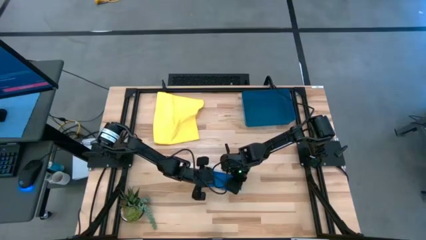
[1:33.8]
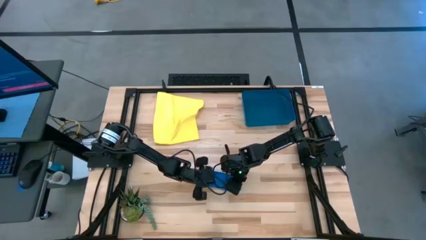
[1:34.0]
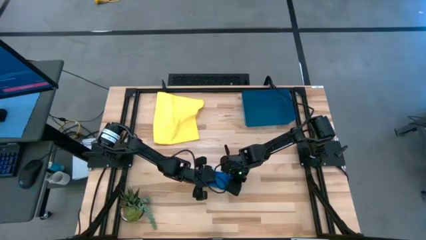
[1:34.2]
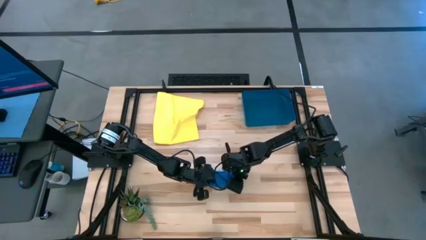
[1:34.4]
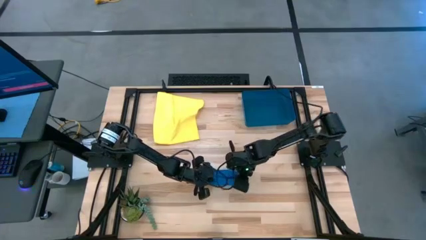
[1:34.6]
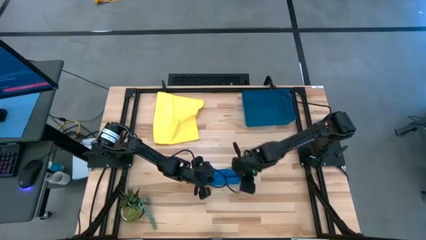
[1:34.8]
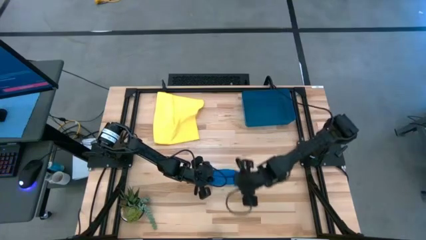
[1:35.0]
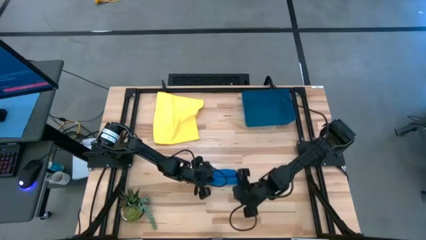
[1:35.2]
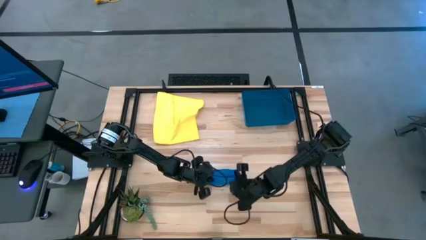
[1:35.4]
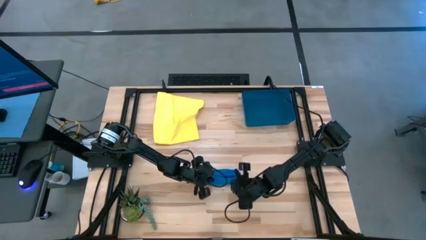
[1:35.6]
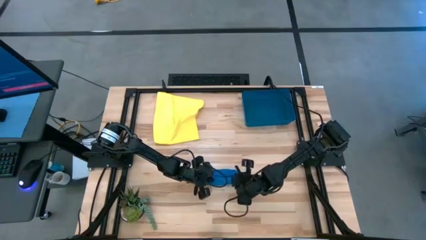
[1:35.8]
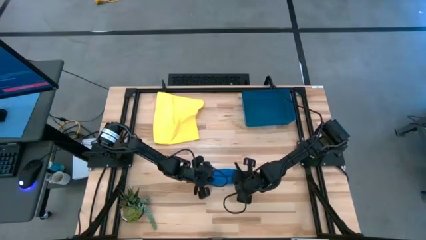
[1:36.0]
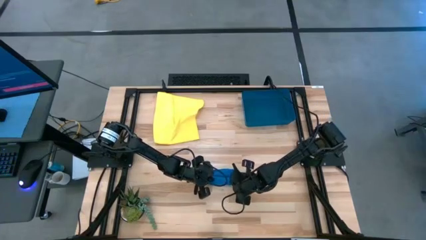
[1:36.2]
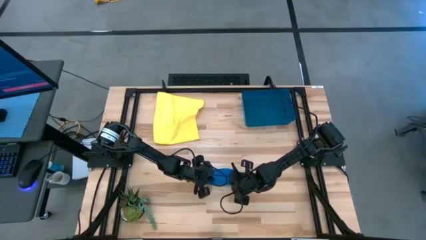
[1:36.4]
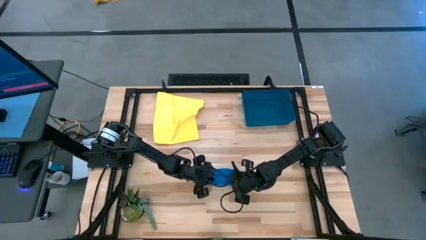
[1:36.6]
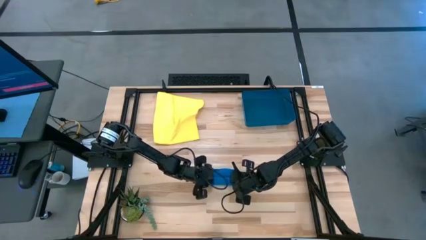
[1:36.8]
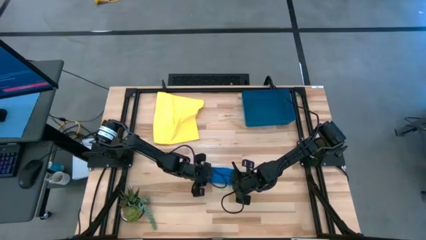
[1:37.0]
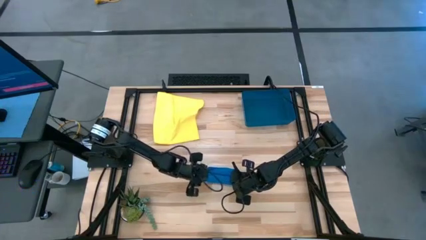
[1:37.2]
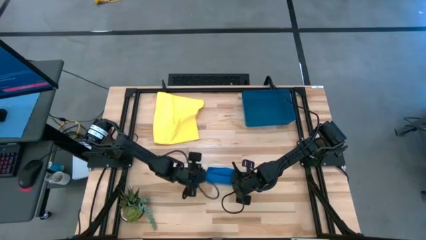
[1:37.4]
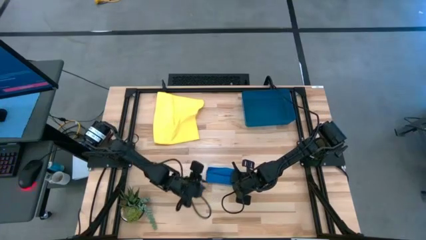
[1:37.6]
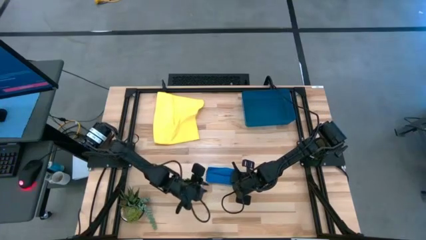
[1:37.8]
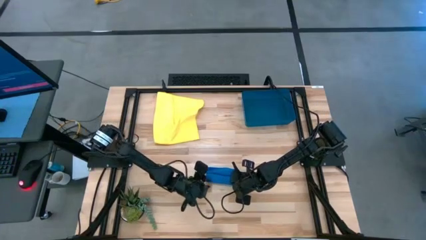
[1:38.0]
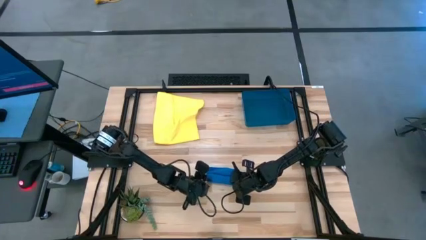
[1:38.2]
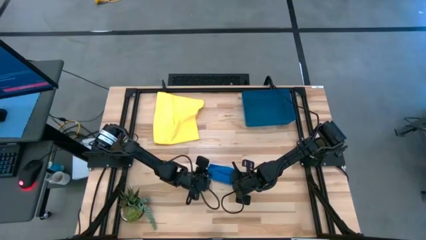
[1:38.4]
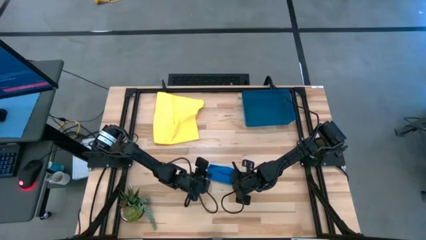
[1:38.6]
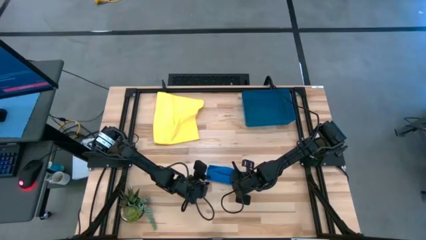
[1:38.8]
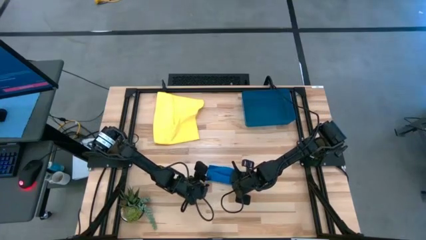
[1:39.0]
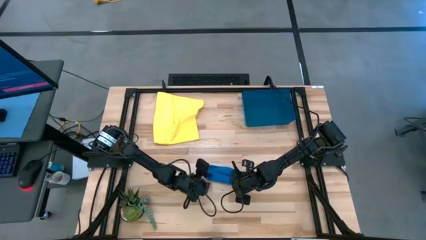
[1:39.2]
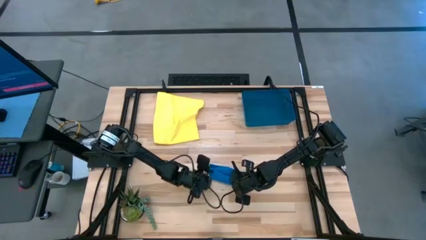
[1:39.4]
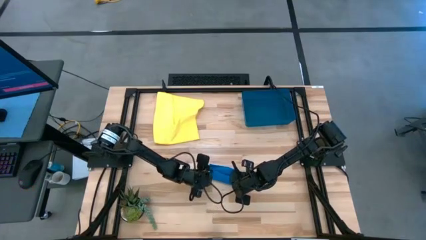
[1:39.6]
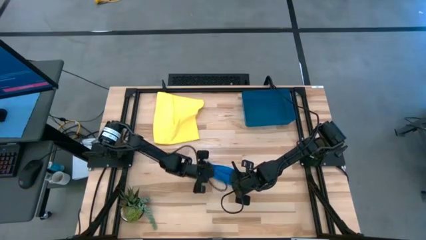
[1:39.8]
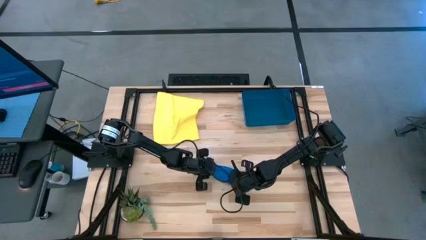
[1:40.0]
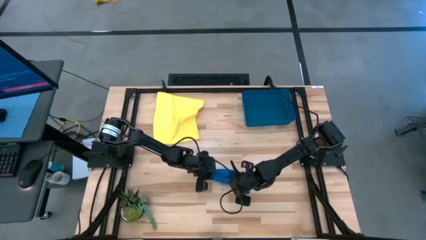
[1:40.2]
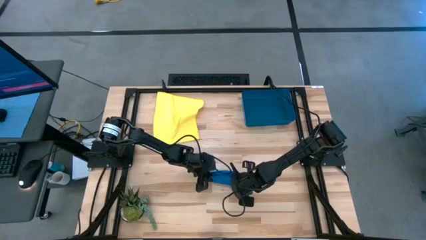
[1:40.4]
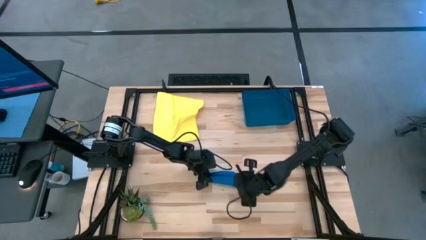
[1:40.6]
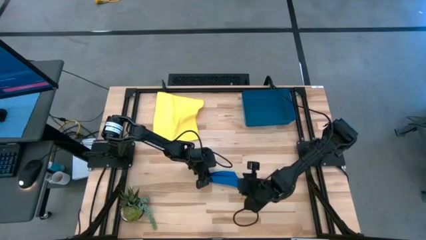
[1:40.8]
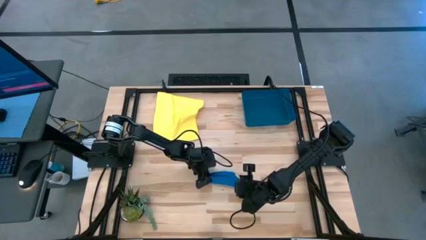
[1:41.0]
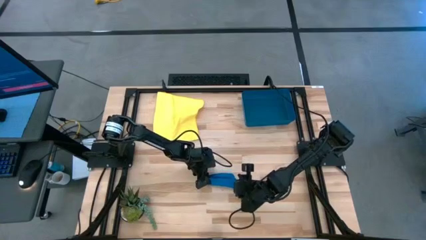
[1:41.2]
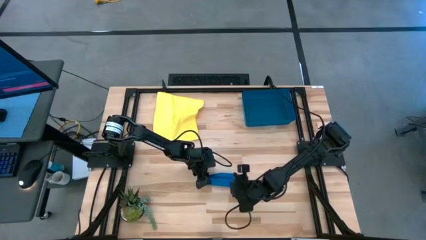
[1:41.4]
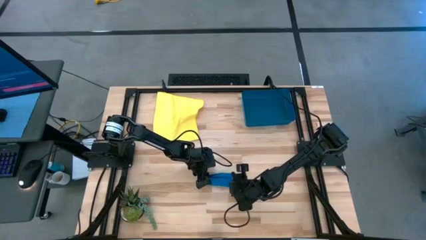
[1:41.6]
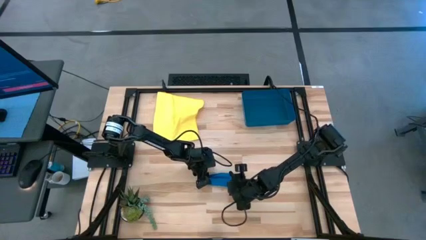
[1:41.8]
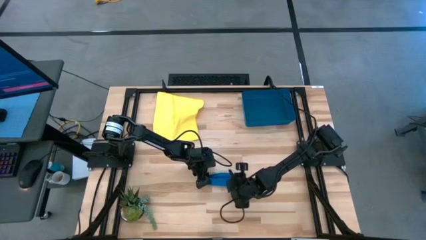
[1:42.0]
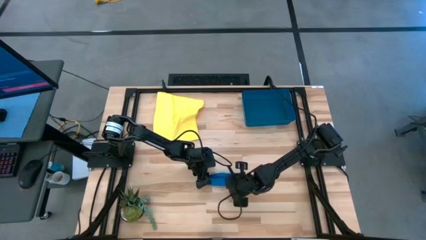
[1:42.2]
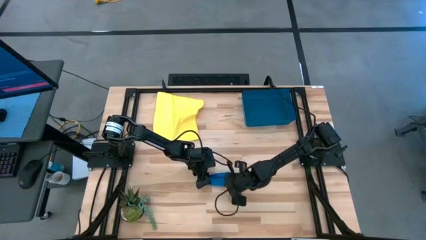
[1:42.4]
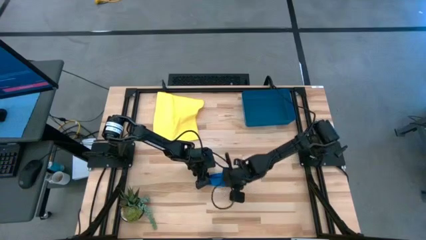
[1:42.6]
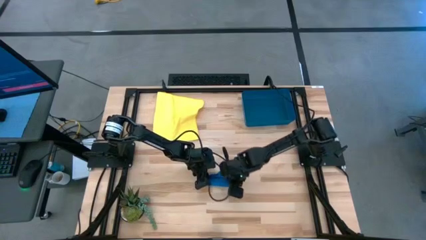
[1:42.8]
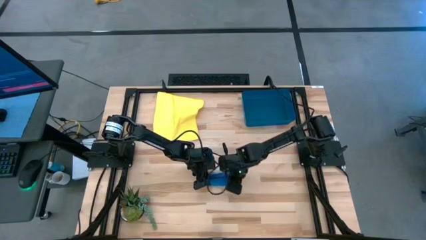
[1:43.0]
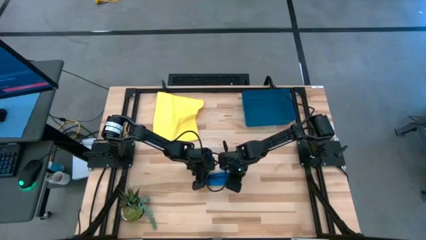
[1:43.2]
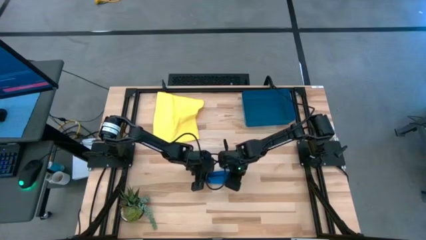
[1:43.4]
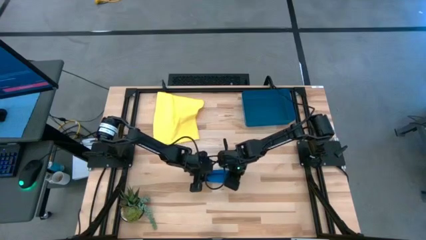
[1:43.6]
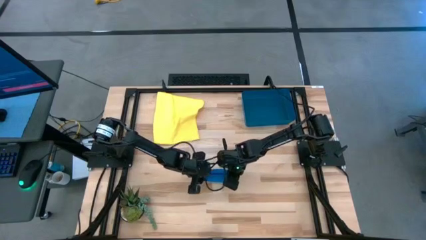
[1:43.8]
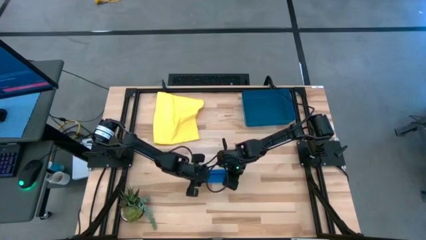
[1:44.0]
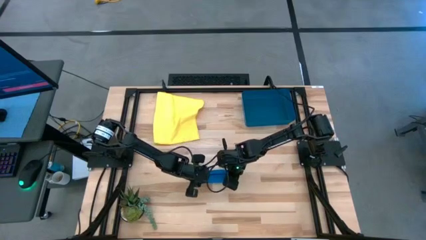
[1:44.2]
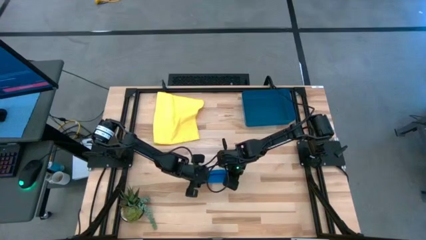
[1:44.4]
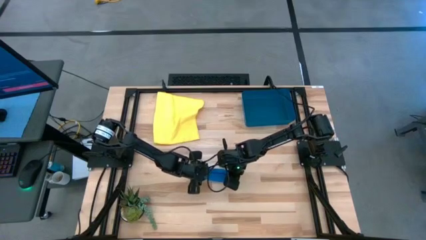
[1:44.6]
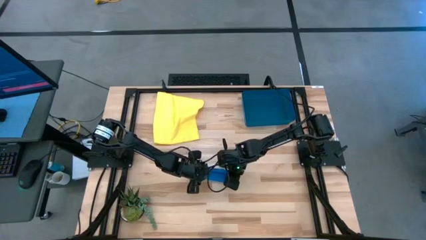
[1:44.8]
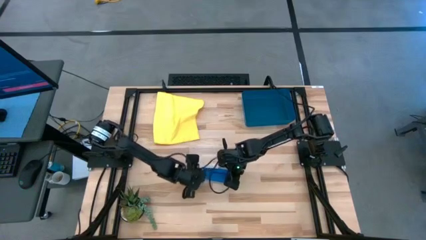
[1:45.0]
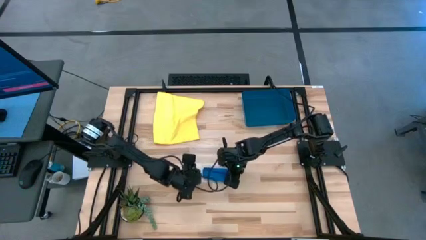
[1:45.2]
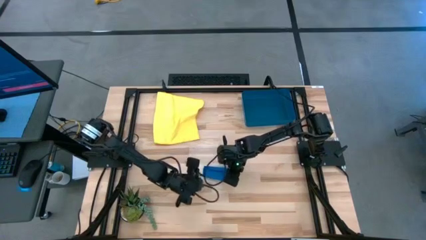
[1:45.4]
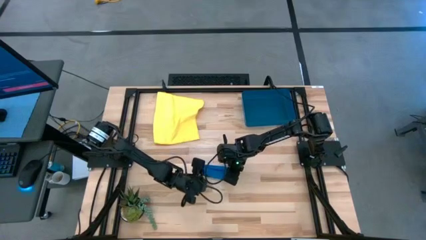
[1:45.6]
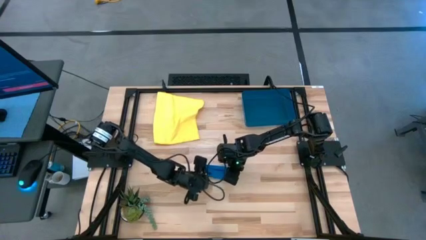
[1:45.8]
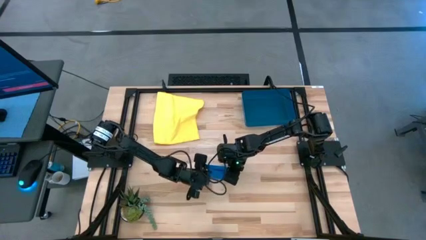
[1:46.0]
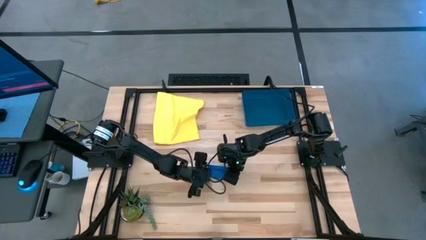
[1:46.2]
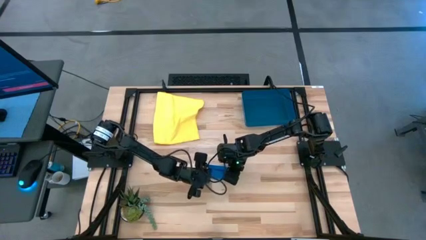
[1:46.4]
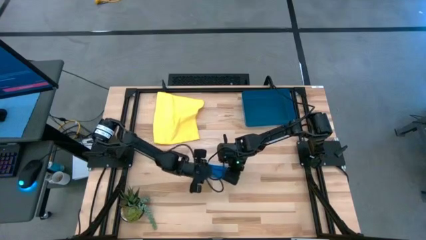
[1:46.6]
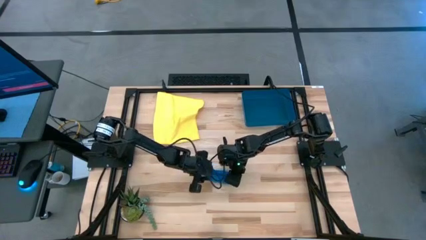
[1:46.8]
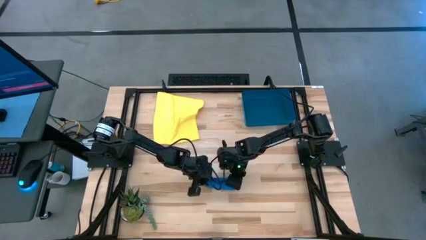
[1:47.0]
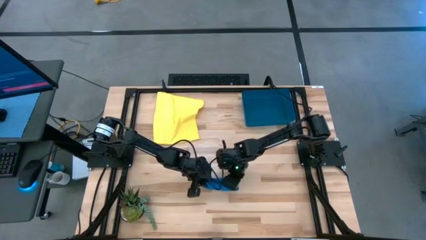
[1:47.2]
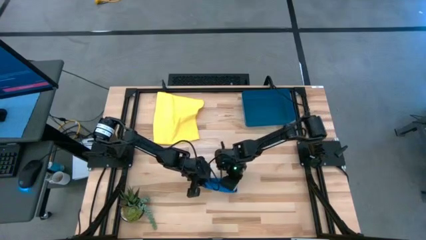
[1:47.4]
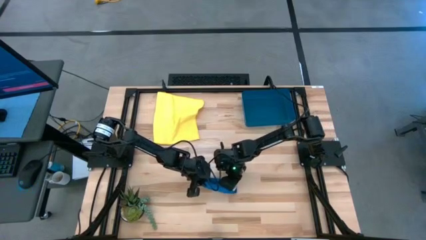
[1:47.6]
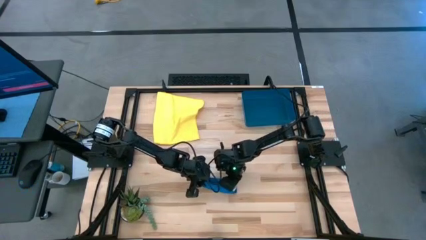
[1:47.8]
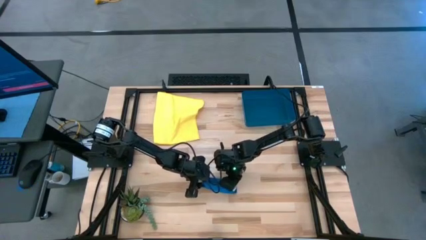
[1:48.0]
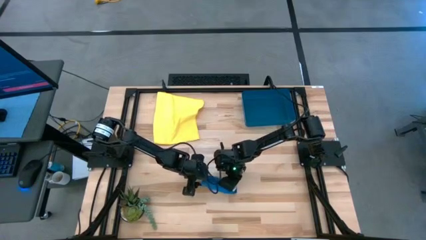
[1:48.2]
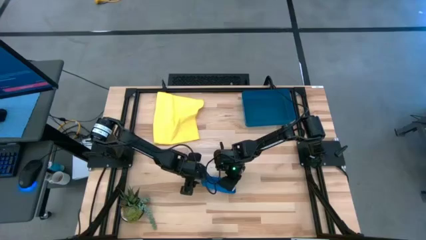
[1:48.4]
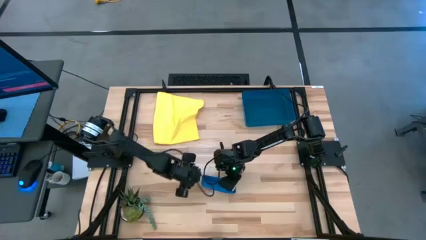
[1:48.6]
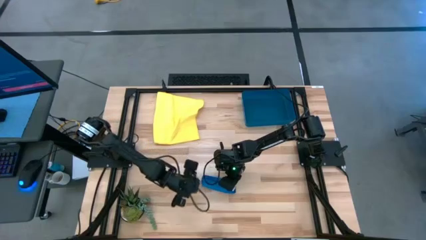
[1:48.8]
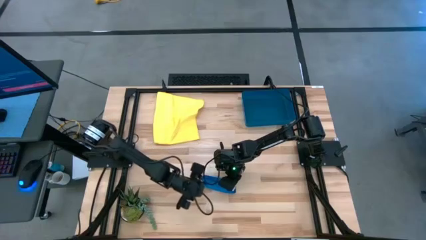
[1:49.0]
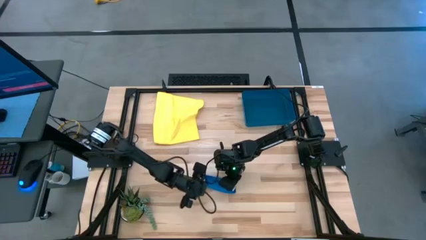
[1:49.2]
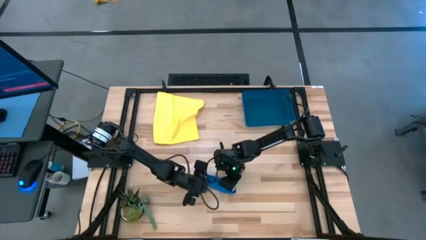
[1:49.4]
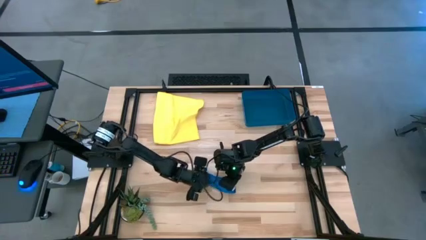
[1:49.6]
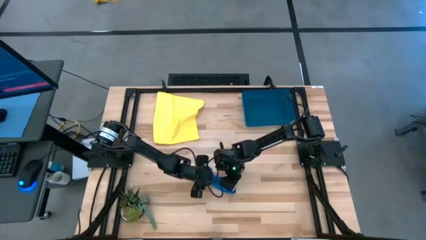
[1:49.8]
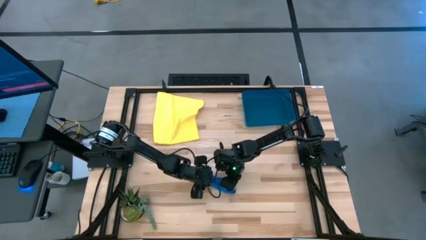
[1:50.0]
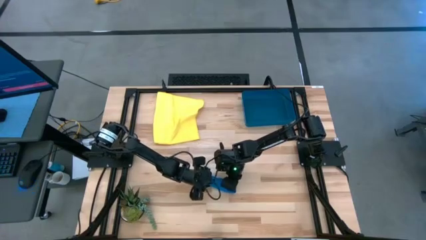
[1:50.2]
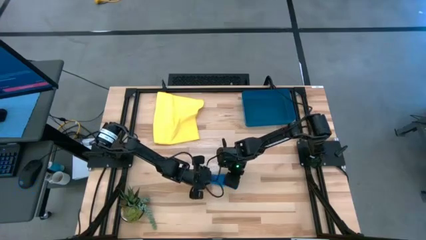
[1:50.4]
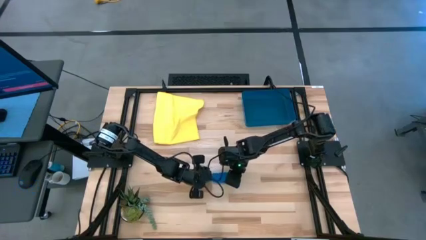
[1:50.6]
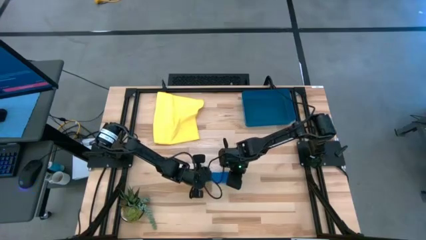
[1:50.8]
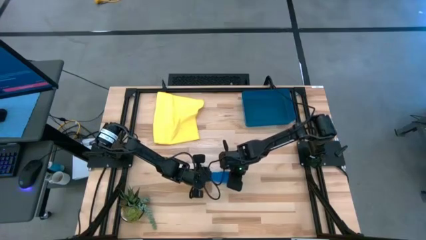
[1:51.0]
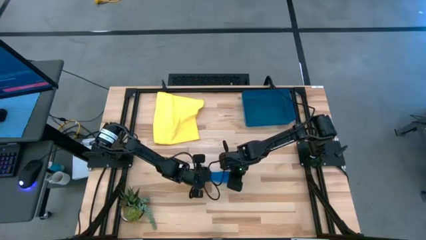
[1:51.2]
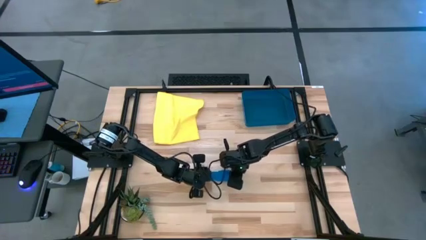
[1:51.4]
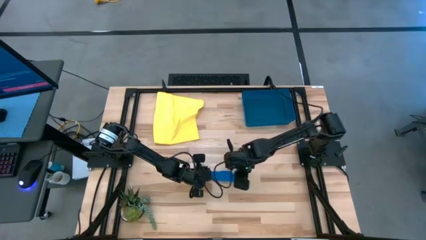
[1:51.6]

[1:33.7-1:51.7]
Task: Roll microfiber towels into tight, uniform cylinder then place into a basket
Roll the blue microfiber cloth
